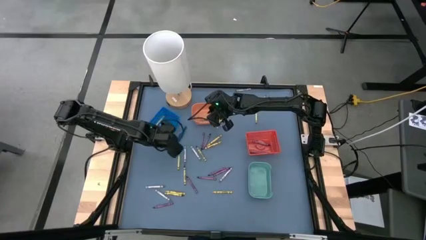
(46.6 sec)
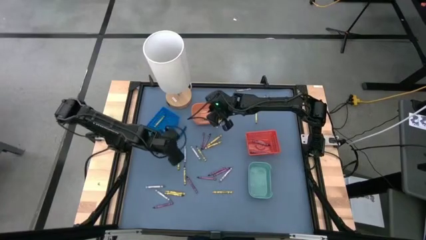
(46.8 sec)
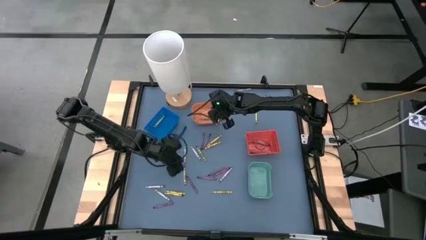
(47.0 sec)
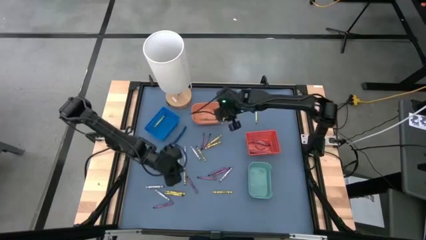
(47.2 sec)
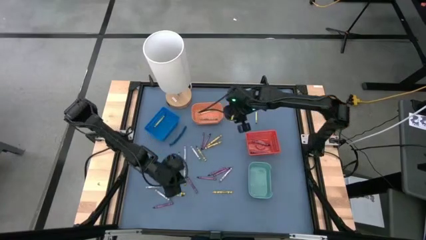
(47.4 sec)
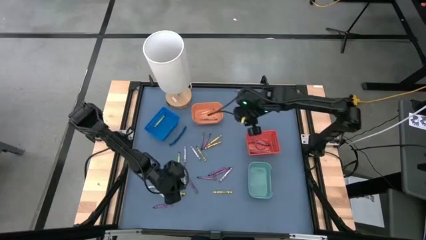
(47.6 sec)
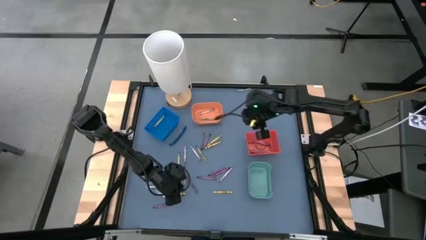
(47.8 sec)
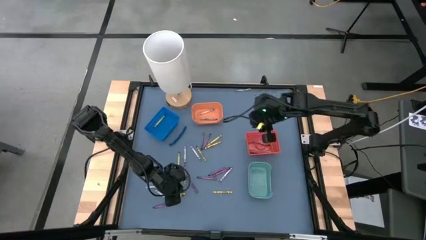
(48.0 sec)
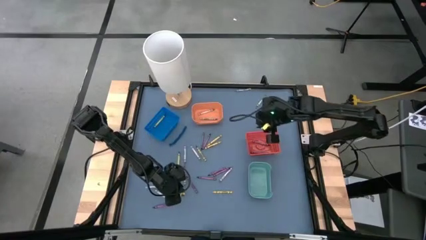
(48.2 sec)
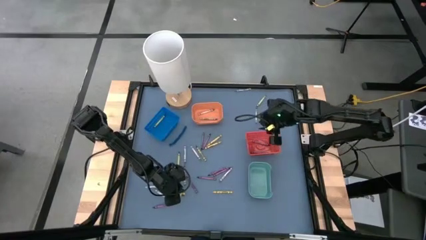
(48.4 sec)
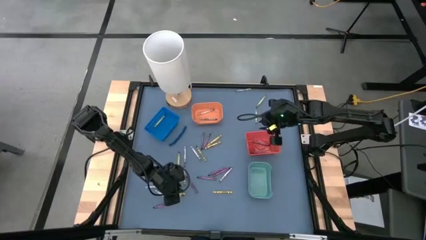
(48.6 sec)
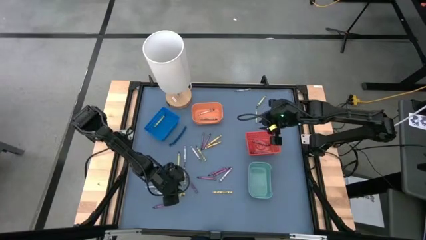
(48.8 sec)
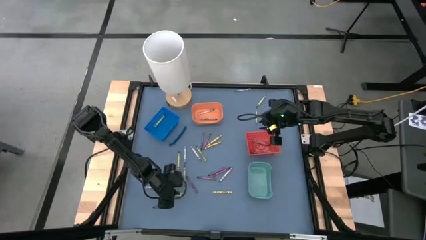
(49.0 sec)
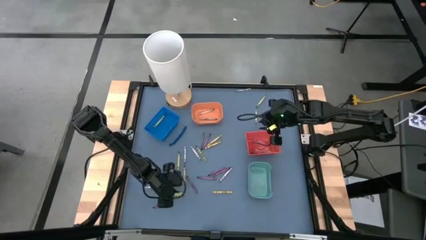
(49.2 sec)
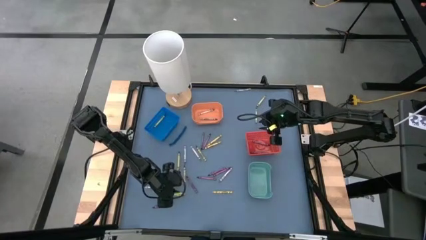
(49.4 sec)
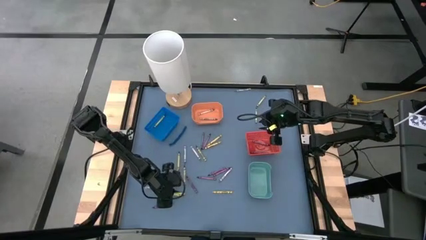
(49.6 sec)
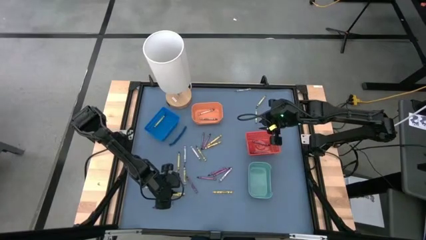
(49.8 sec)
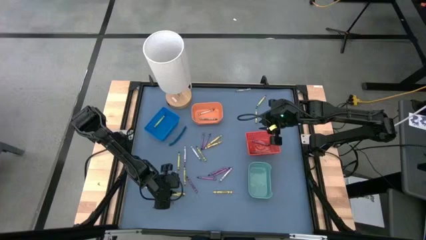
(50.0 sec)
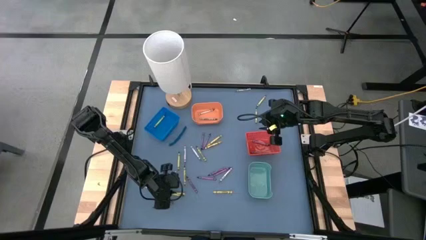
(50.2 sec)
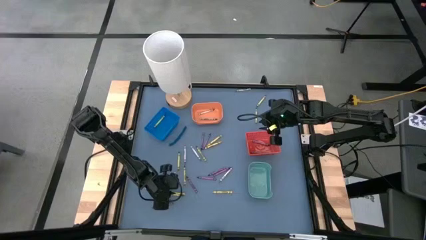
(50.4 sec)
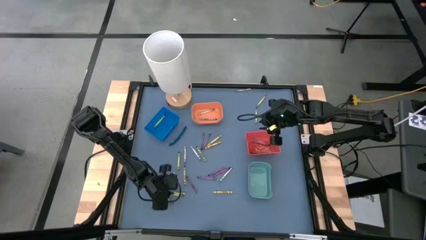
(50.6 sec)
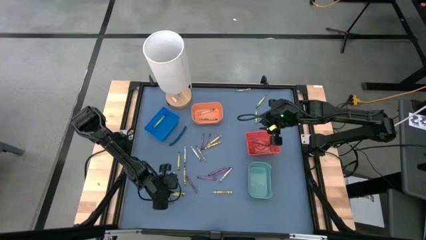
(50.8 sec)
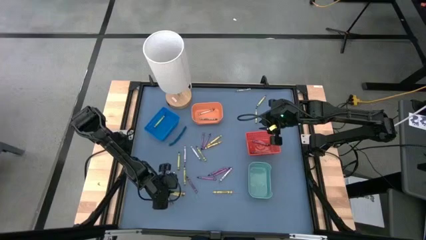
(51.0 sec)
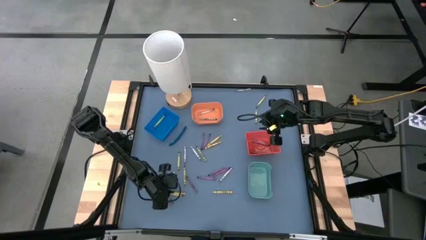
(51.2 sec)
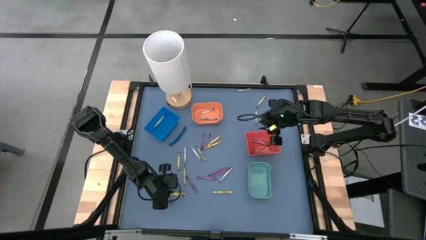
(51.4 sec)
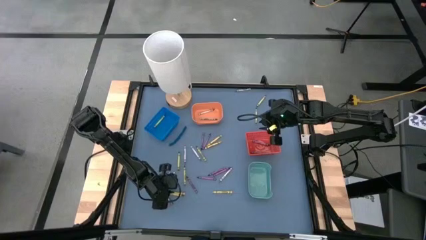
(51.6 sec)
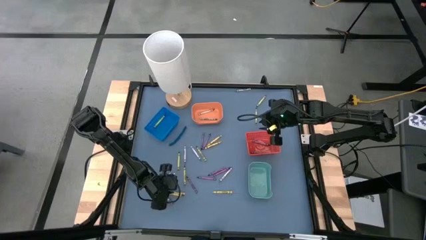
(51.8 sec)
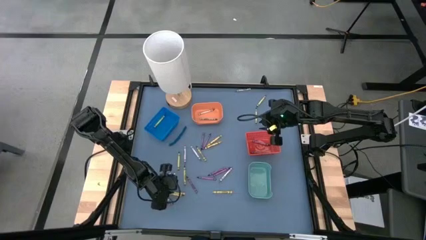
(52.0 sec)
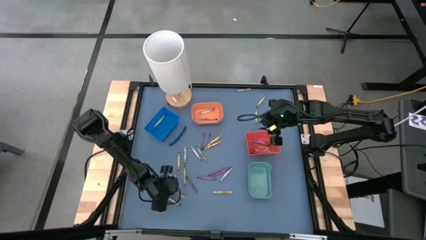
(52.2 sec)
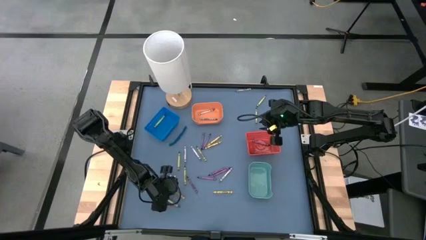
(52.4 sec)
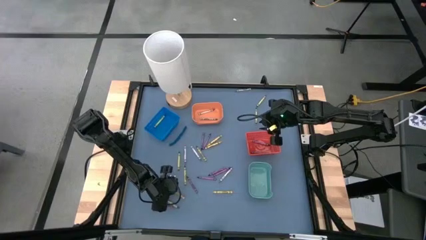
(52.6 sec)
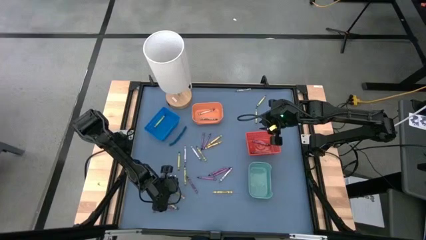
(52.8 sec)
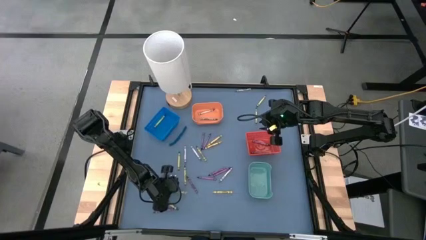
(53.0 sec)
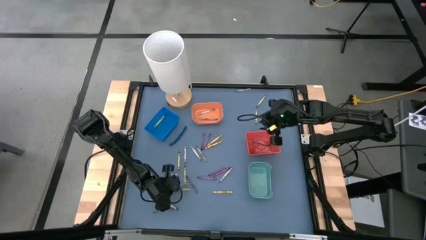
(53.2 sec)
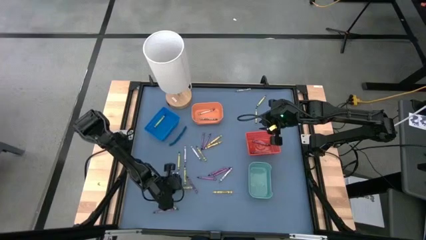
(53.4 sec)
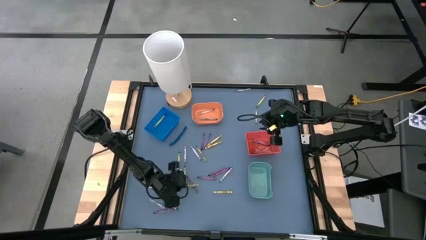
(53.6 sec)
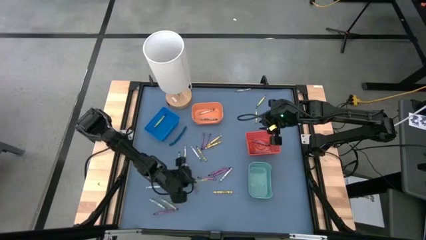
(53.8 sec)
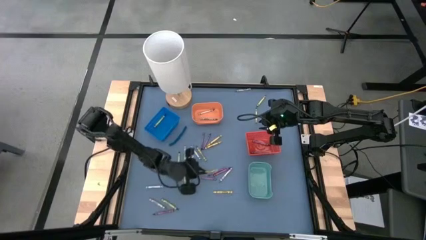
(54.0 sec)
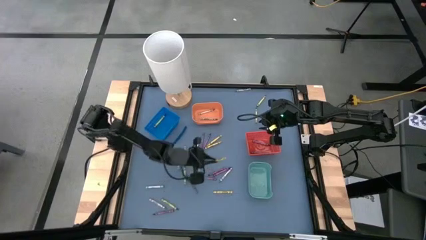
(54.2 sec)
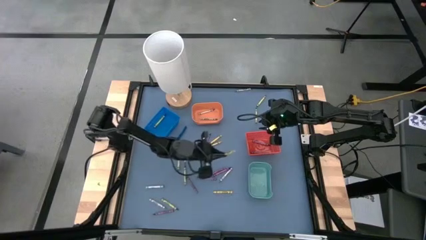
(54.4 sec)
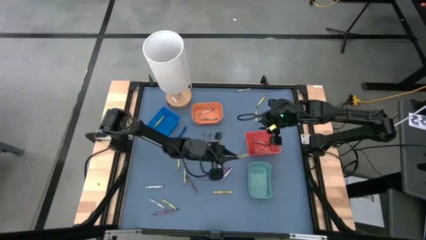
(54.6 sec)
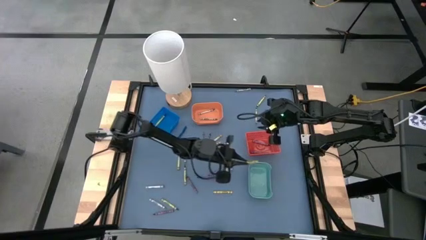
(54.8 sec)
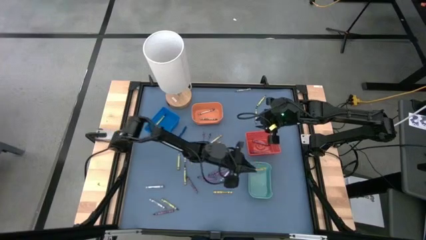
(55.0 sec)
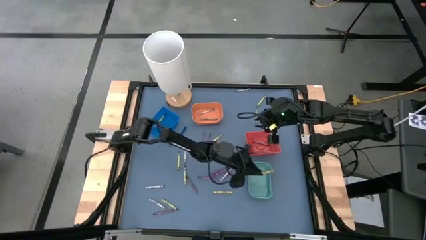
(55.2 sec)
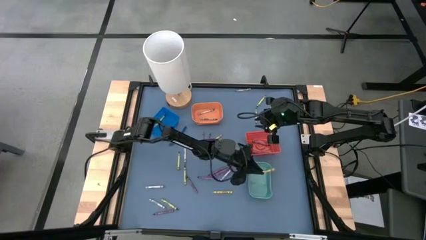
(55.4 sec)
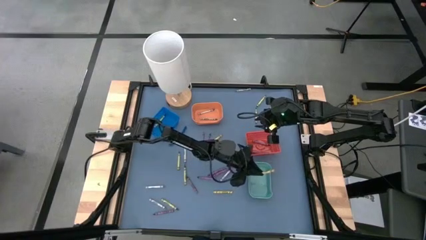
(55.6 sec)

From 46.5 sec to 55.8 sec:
Task: Sort crayons
Put the yellow crayon into the light blue bin

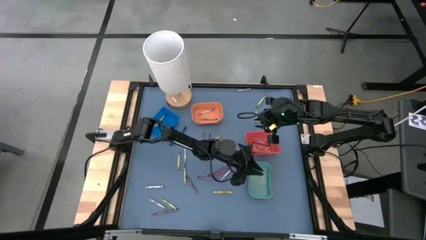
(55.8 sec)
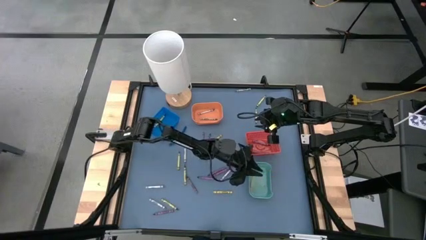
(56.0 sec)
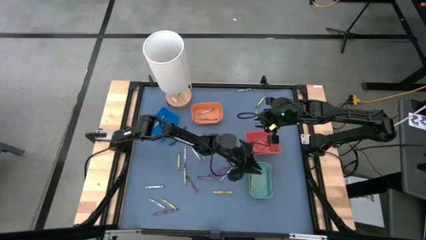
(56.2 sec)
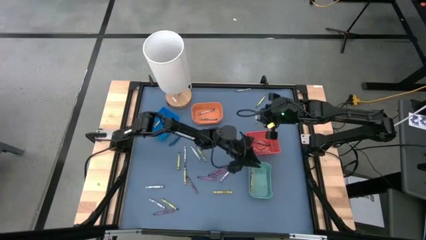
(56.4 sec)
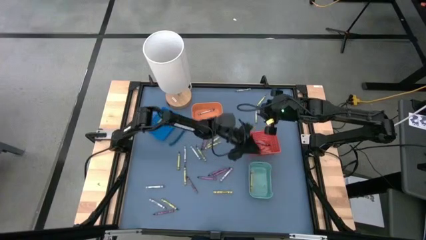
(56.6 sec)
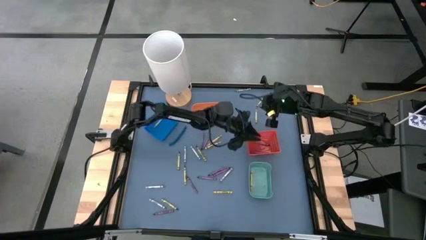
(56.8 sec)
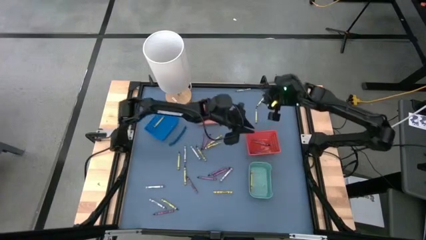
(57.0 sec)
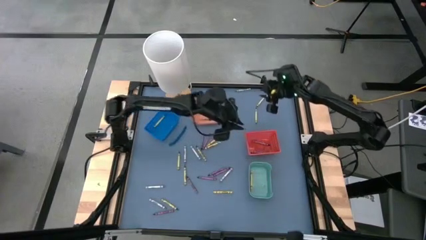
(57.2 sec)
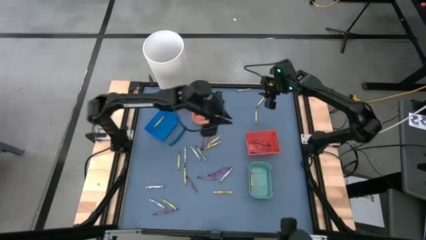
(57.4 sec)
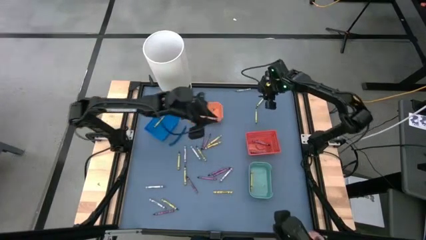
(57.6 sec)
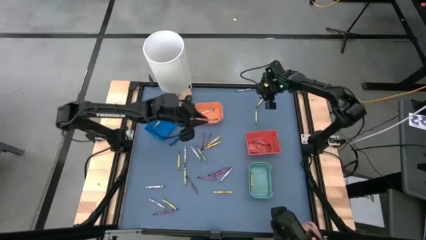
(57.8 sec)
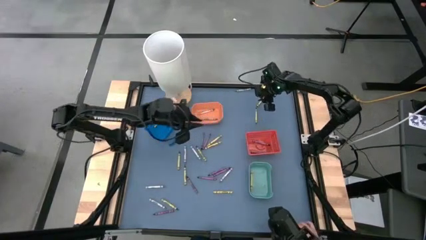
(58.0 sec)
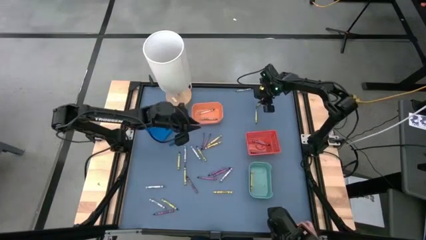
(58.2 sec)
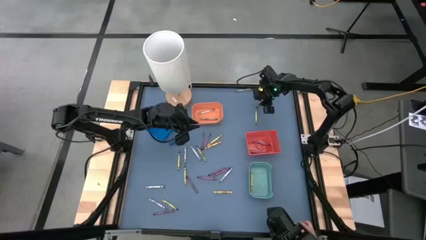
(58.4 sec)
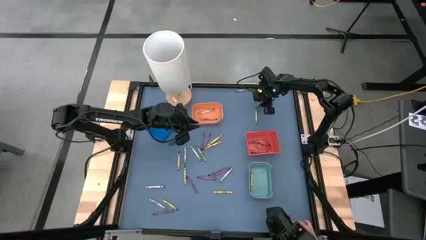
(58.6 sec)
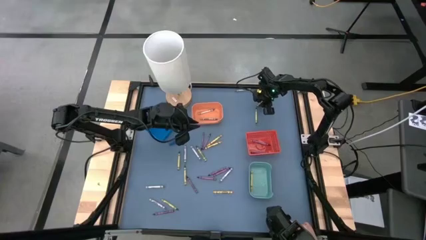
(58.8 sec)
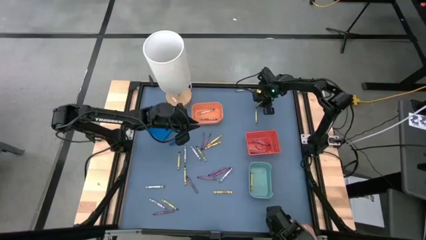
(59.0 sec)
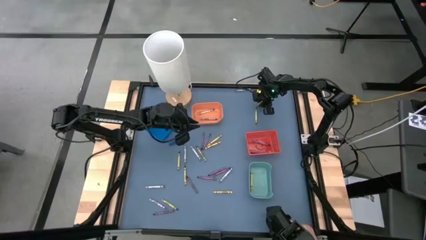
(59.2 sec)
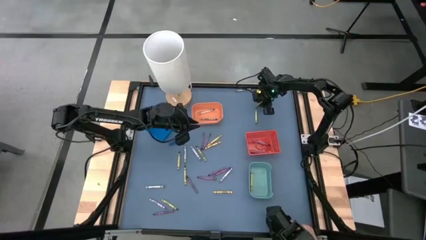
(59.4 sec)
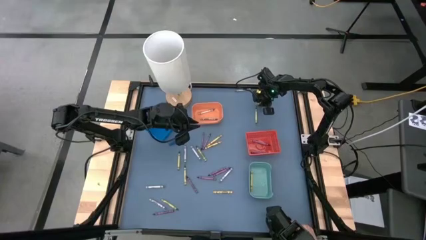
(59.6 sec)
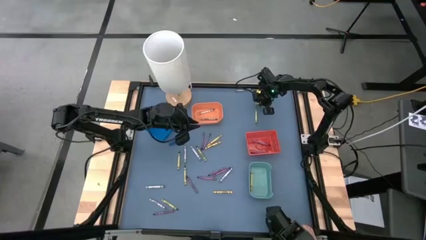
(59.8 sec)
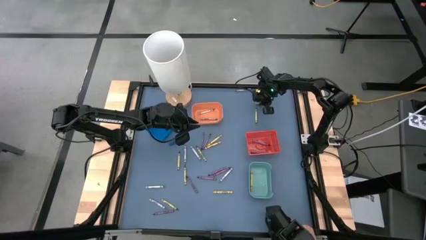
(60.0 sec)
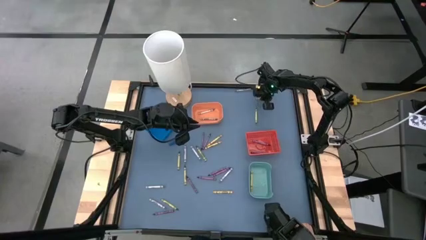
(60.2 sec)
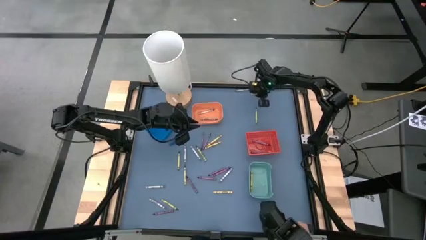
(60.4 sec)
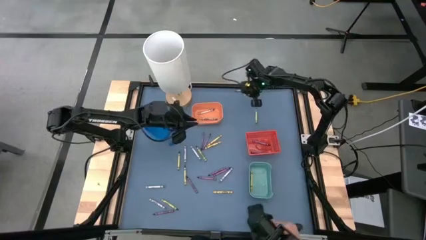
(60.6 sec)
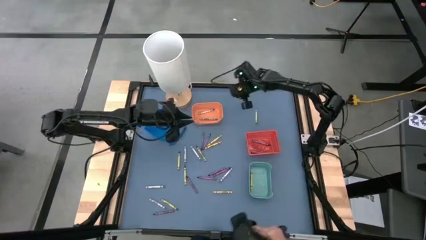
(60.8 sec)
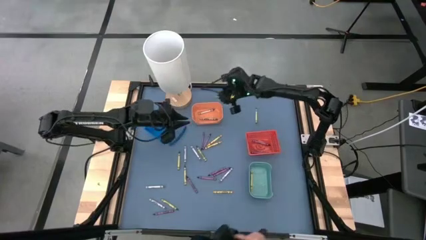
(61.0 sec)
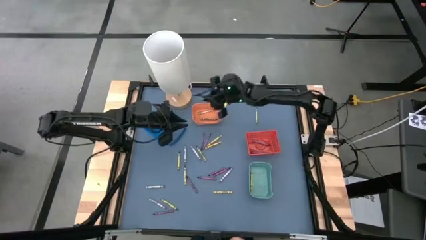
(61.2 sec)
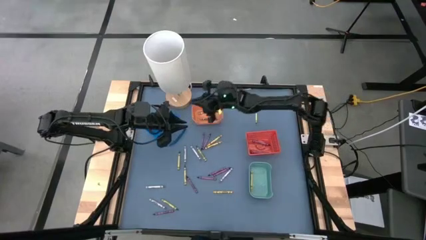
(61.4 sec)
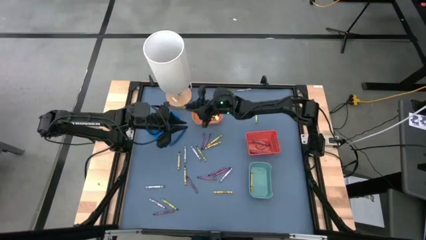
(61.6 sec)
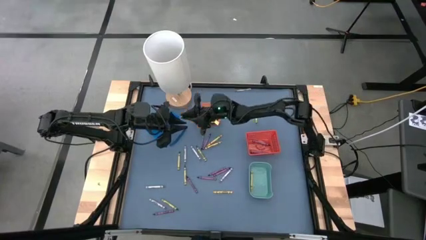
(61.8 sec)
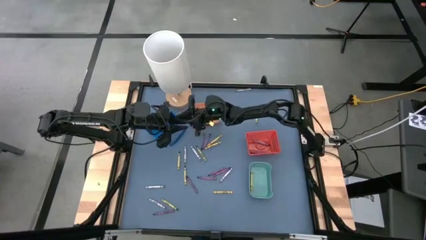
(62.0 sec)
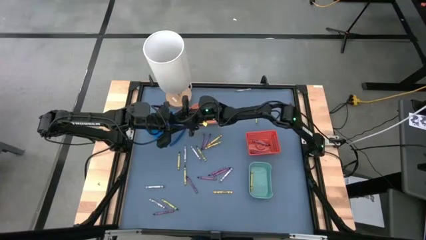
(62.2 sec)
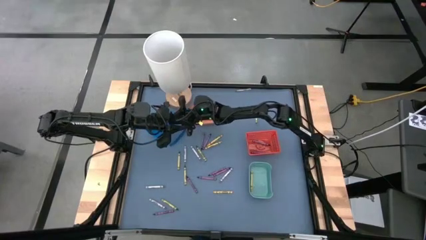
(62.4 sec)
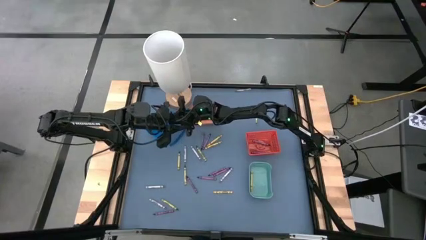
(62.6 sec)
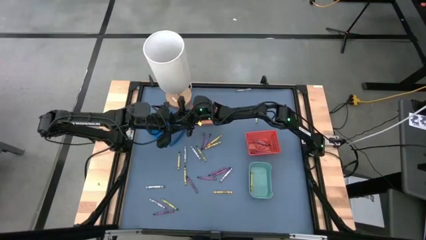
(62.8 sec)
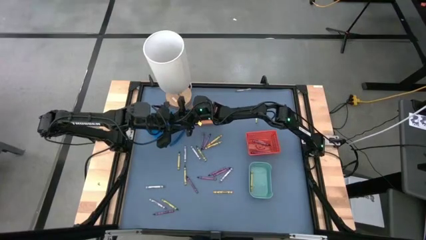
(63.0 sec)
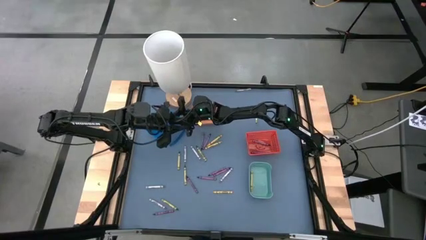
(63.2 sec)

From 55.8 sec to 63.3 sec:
Put the green crayon into the dark blue bin
